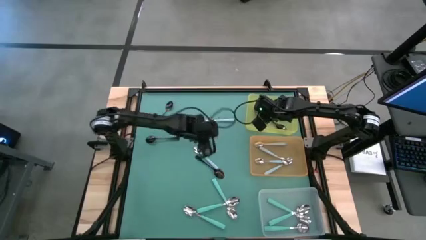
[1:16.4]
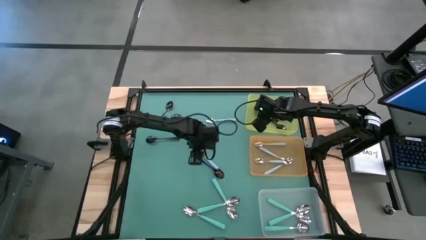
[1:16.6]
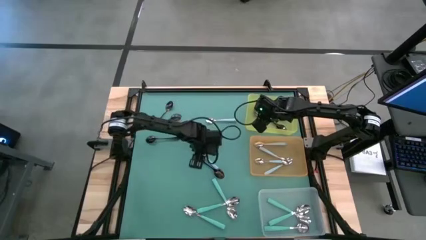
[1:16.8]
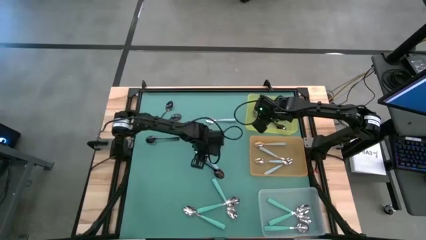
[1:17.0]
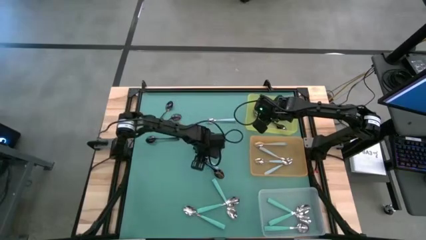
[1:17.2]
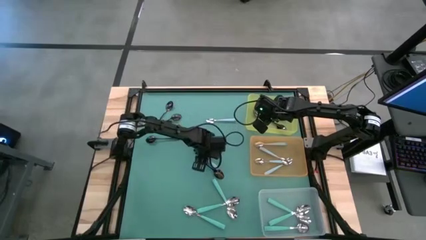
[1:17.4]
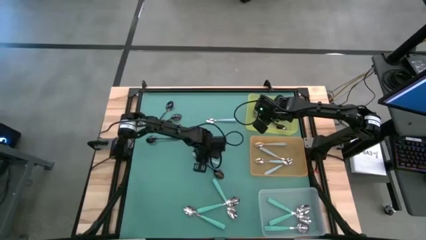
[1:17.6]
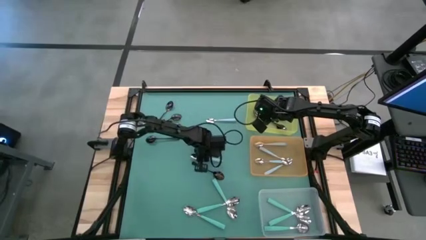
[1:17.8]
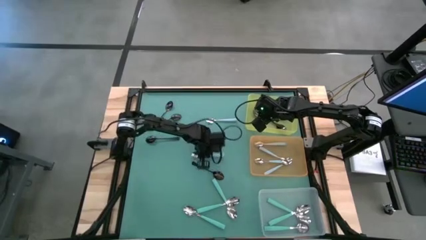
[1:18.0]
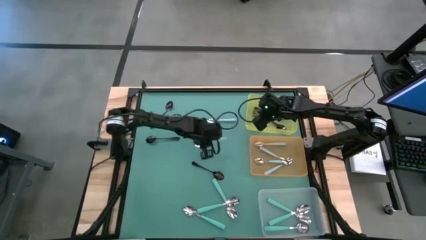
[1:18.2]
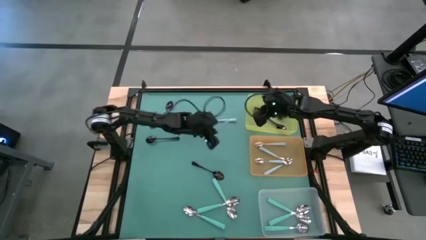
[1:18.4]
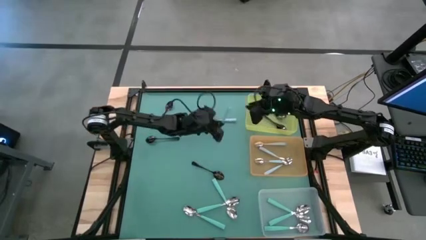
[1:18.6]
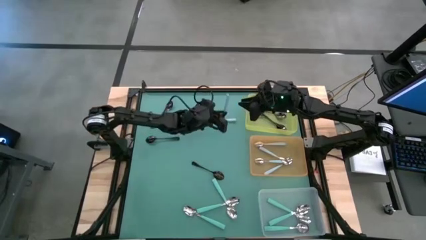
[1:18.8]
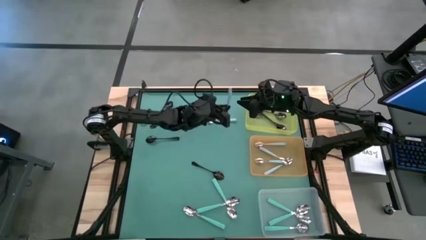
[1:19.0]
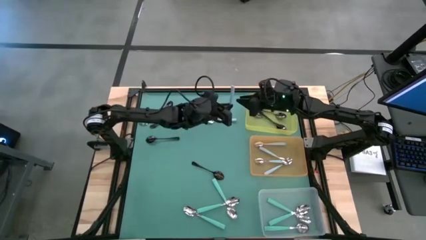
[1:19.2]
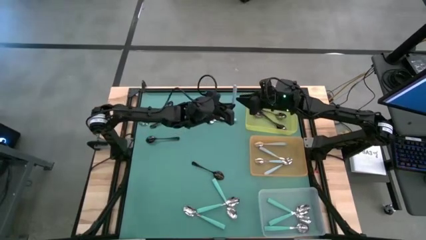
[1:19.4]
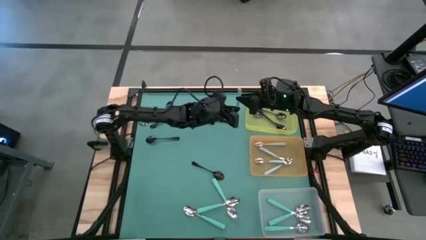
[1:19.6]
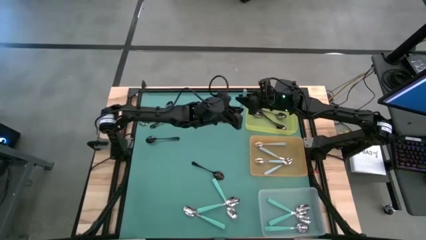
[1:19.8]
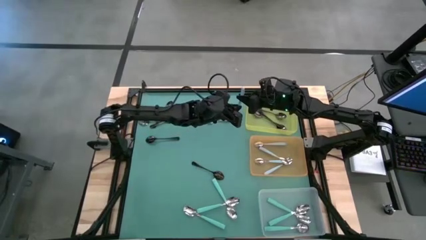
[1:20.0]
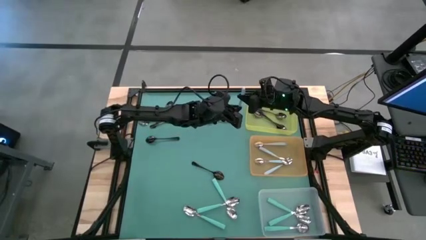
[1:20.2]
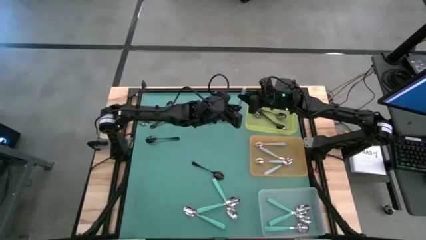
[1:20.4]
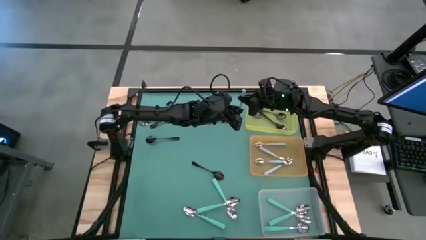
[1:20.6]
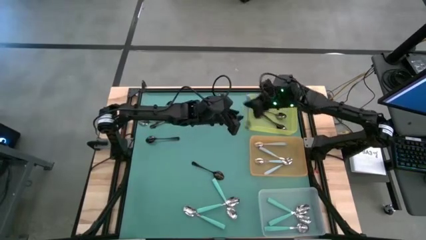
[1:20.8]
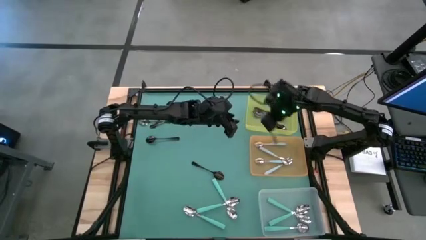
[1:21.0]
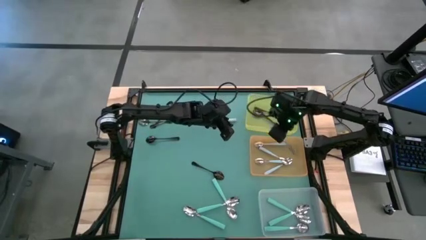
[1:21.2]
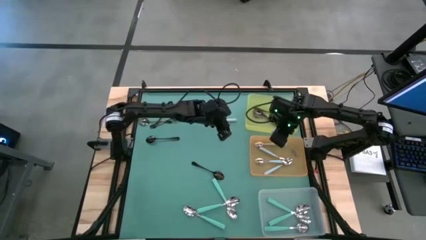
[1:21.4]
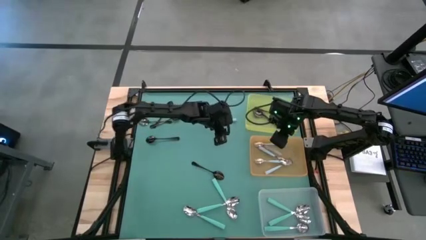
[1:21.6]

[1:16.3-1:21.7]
Task: Sort silverware by color (type)
Put the blue spoon into the orange bin

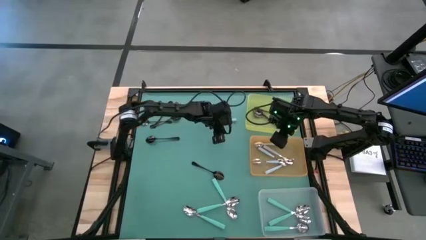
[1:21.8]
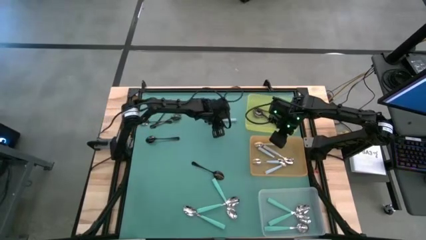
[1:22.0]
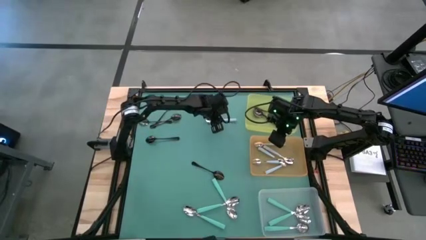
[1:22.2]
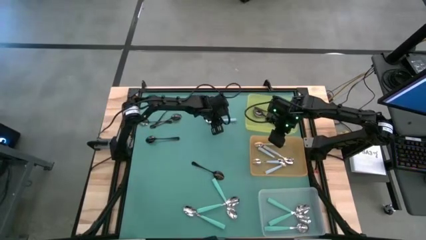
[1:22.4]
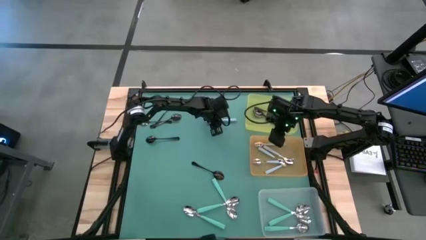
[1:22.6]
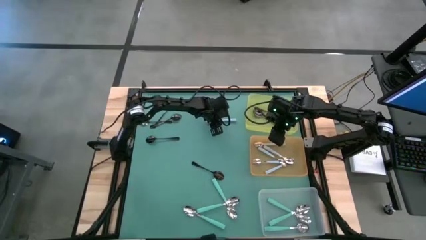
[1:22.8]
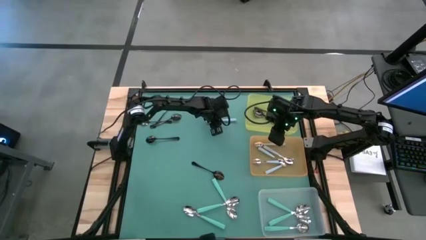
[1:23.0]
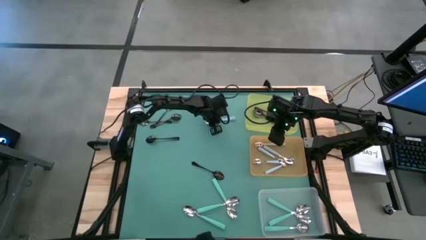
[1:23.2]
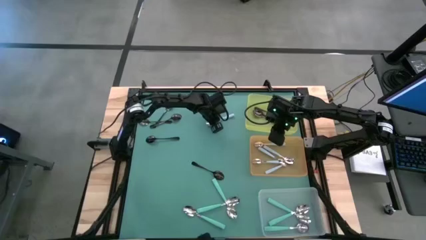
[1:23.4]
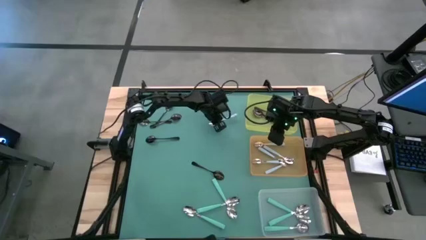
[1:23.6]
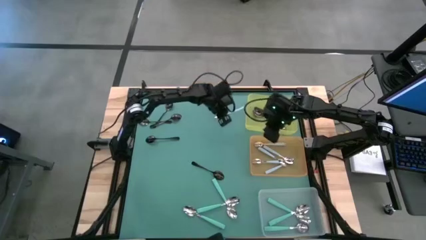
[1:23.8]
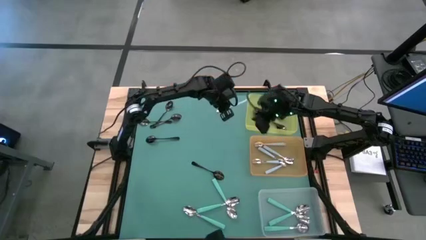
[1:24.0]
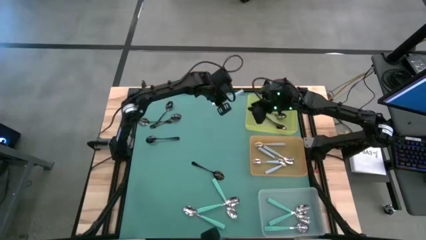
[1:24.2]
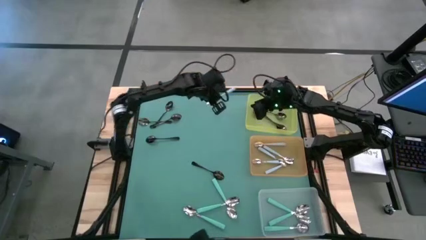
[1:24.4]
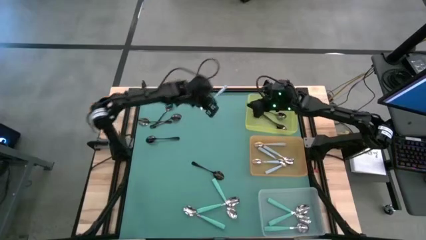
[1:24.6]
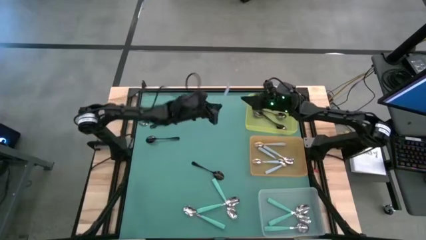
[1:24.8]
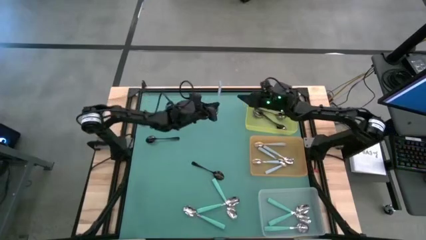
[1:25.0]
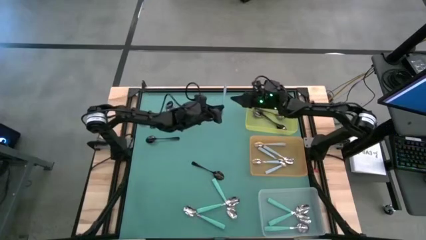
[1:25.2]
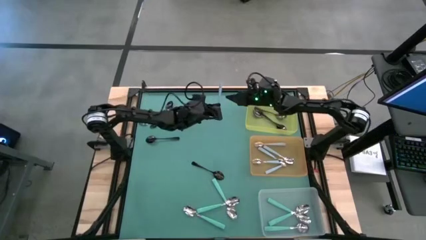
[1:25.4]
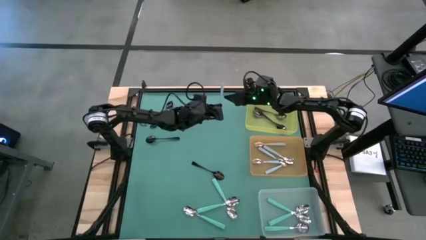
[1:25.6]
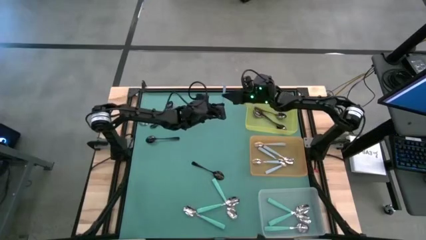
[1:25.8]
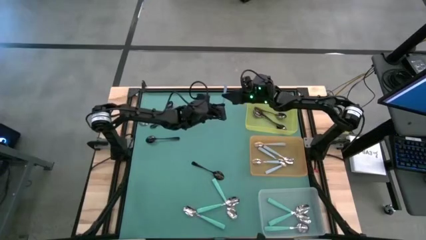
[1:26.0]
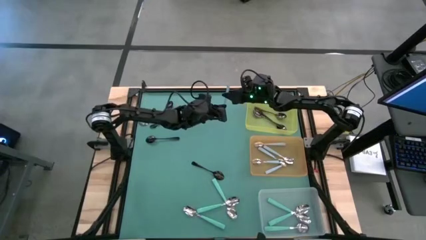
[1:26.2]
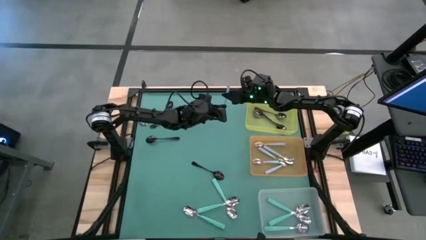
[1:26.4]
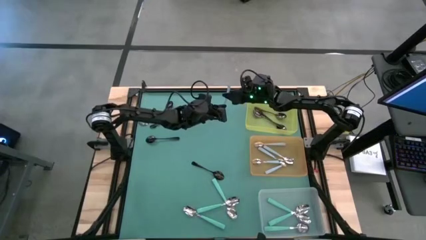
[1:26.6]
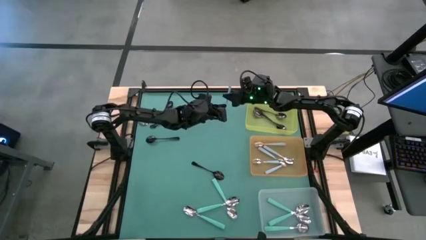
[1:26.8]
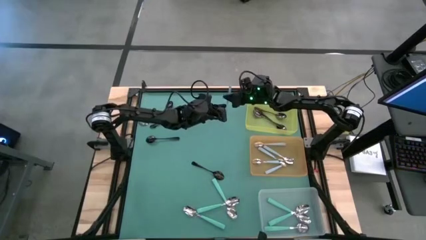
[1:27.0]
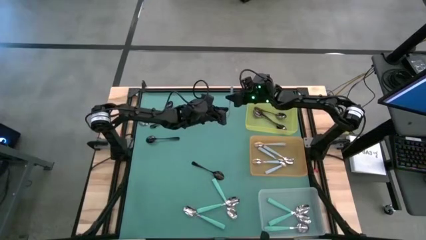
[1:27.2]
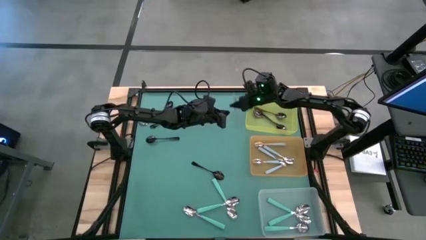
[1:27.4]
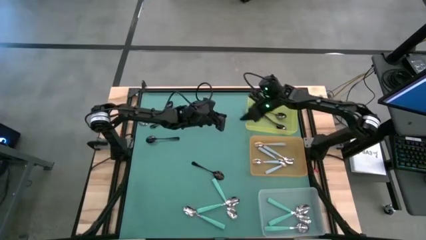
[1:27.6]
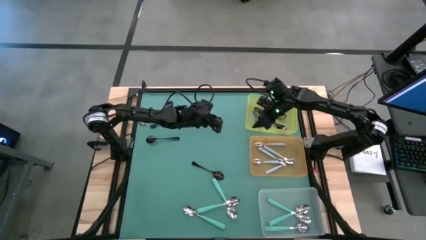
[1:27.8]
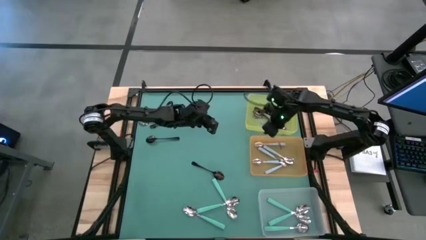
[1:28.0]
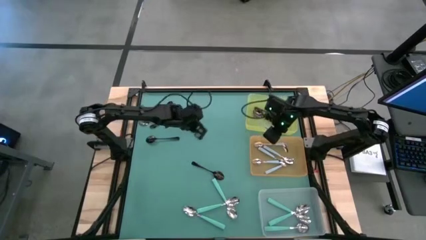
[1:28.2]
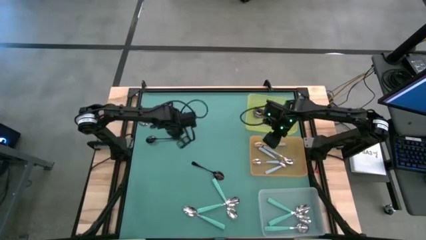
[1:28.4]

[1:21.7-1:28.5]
Put the blue spoon into the orange bin

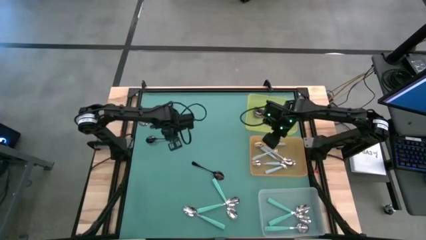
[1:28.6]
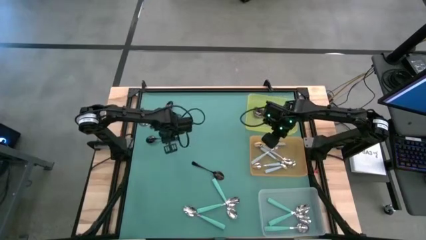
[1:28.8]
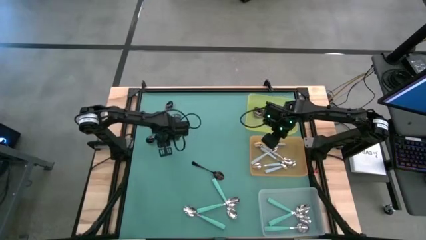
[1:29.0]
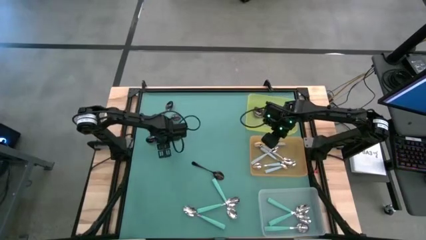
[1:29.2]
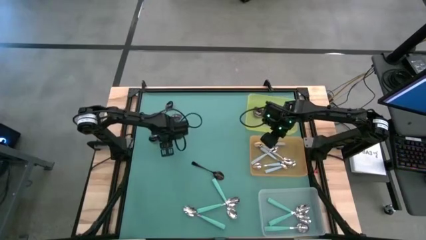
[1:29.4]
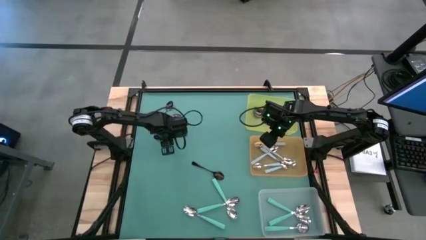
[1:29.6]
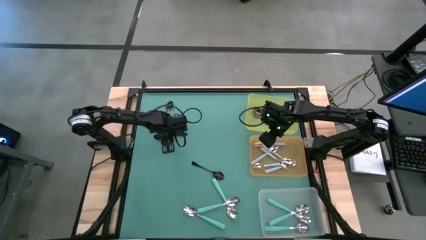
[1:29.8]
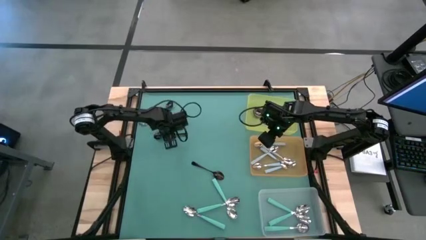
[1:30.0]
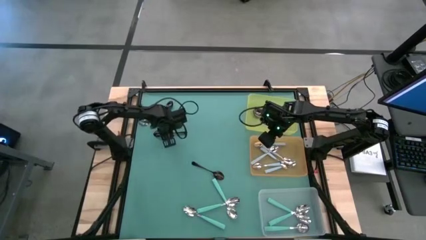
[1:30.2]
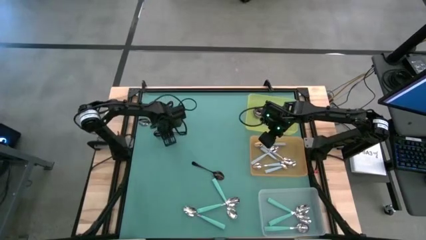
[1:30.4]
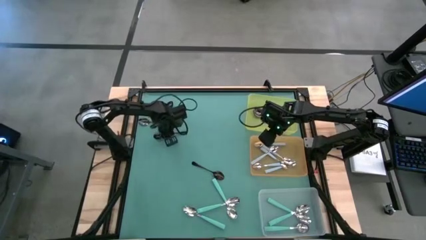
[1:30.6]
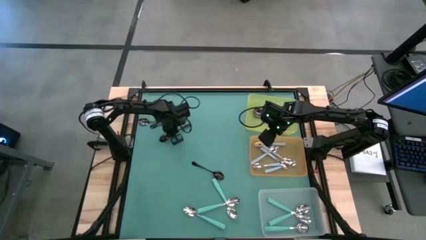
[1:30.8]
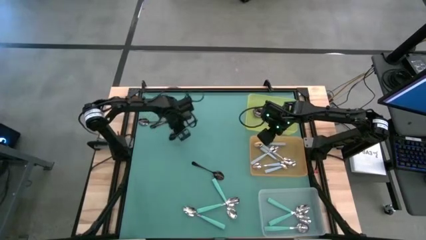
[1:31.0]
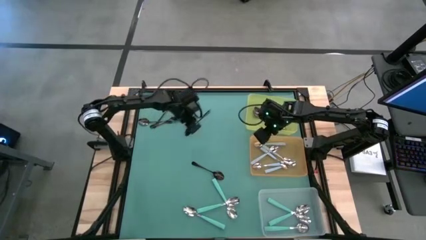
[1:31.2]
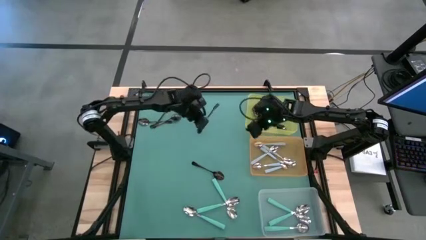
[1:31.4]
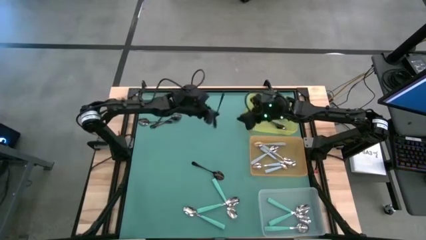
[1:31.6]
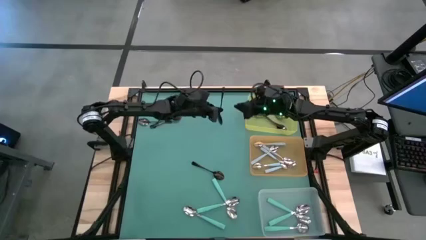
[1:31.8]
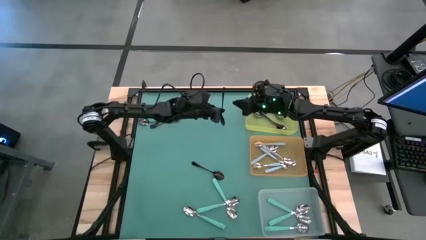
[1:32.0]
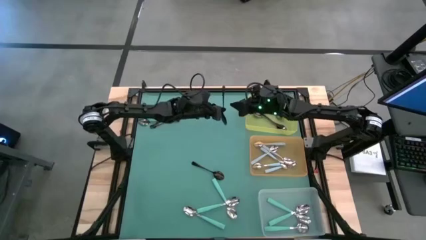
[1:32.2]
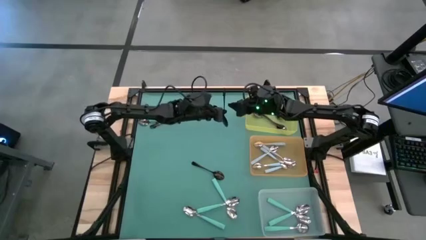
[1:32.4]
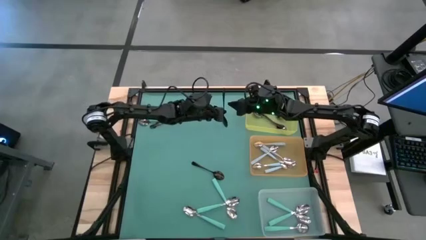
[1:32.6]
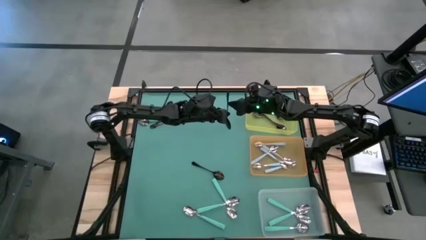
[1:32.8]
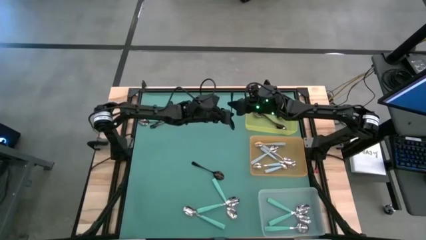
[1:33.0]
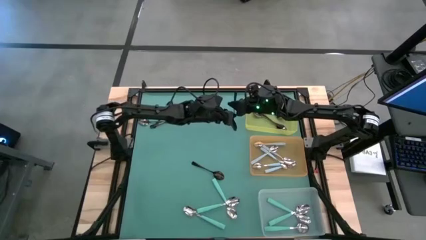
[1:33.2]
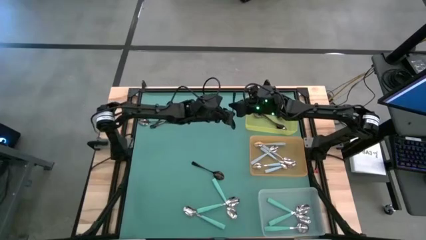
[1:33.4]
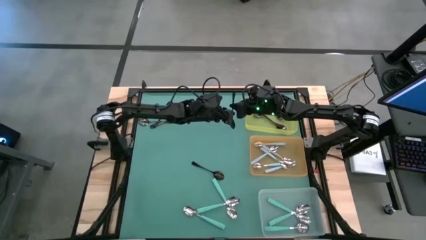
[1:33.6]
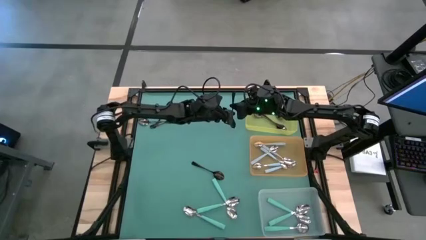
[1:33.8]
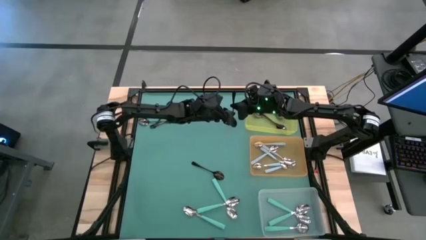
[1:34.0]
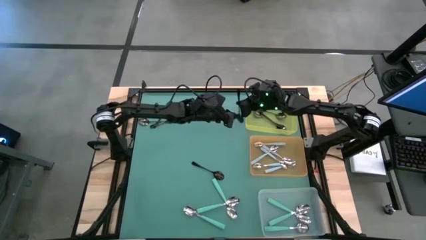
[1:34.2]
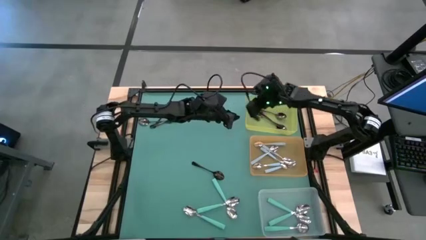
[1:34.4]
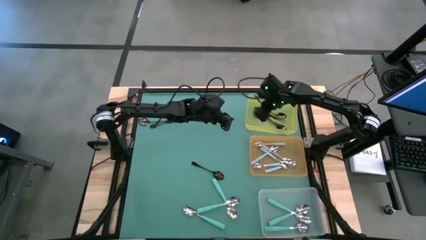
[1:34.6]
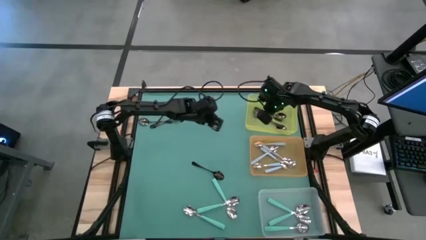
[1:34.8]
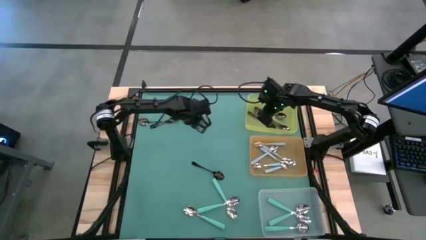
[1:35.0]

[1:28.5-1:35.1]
Put the black spoon into the yellow bin
